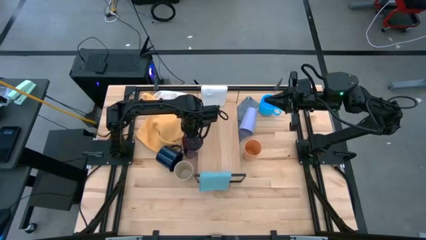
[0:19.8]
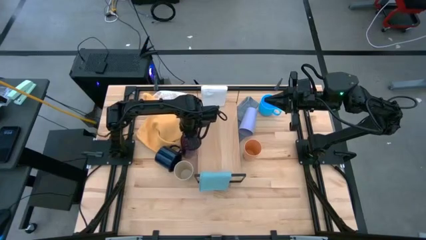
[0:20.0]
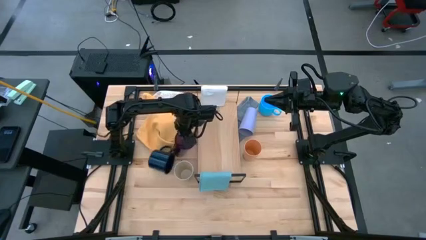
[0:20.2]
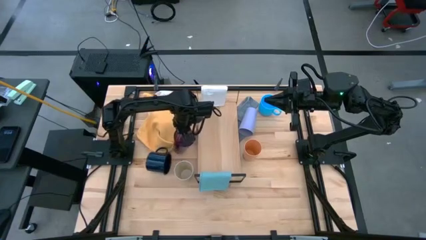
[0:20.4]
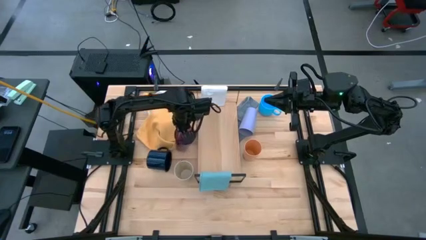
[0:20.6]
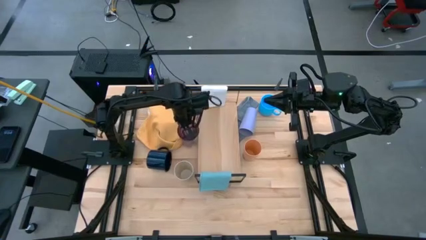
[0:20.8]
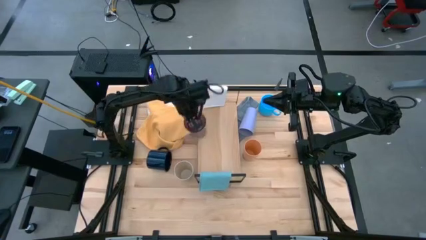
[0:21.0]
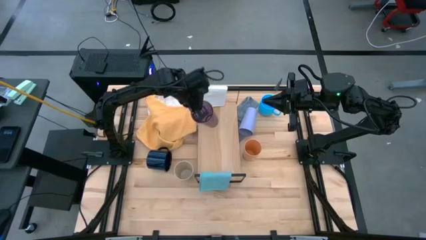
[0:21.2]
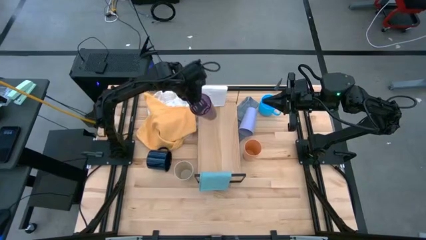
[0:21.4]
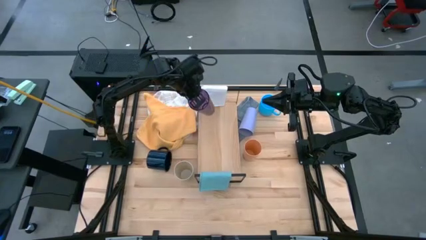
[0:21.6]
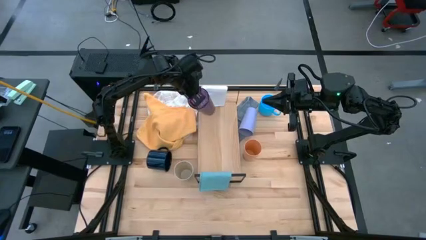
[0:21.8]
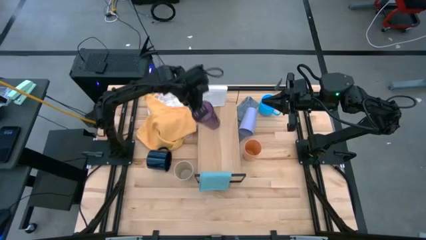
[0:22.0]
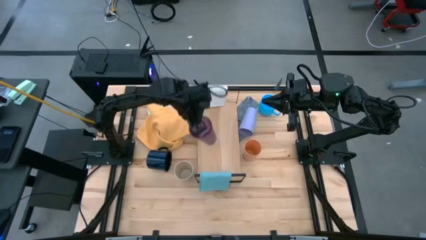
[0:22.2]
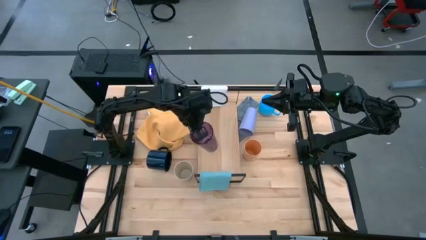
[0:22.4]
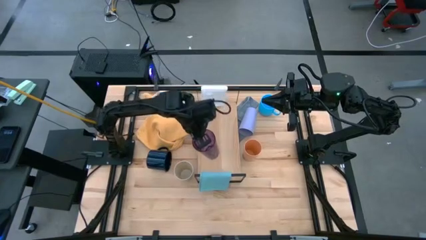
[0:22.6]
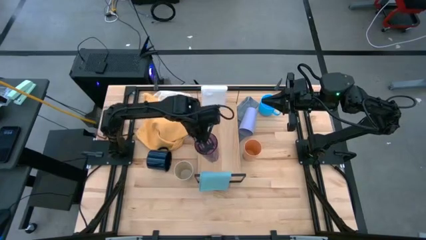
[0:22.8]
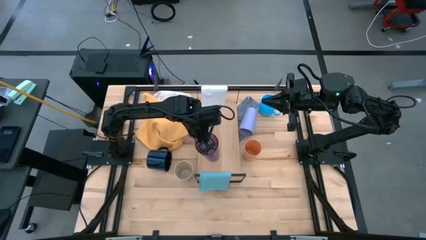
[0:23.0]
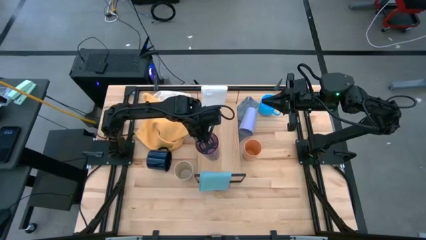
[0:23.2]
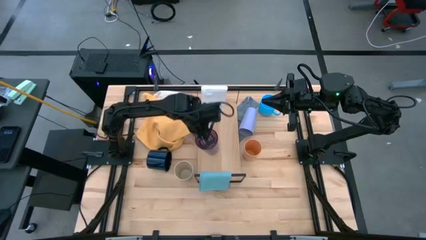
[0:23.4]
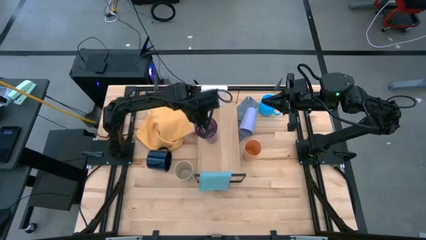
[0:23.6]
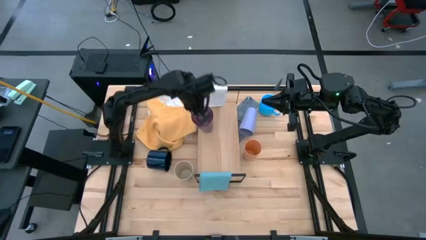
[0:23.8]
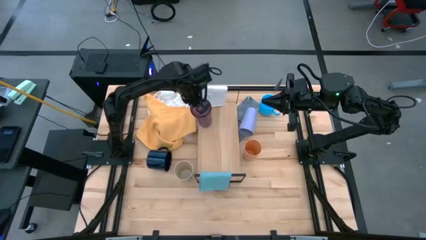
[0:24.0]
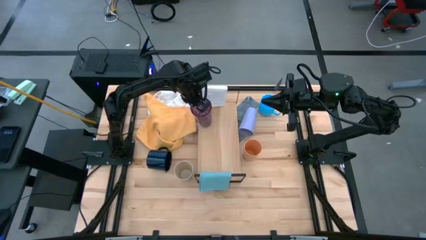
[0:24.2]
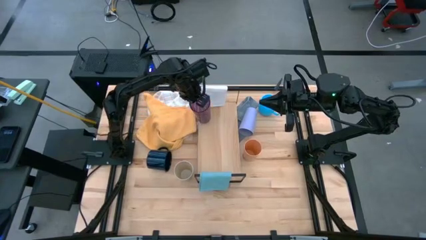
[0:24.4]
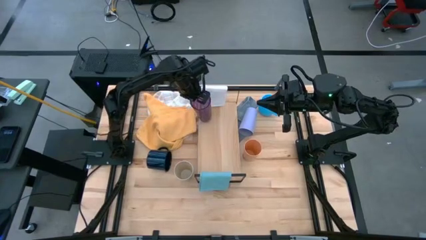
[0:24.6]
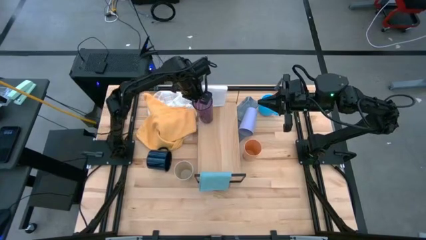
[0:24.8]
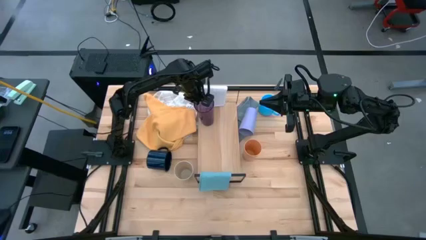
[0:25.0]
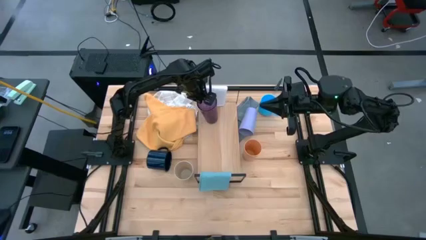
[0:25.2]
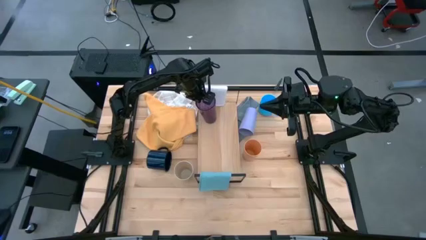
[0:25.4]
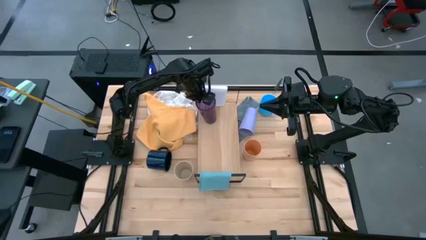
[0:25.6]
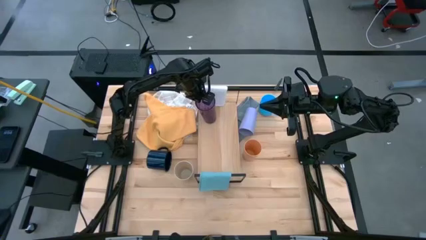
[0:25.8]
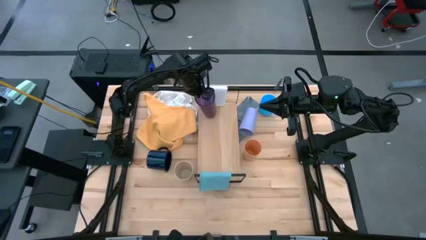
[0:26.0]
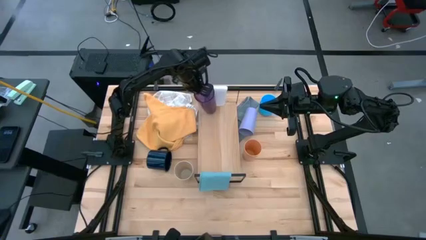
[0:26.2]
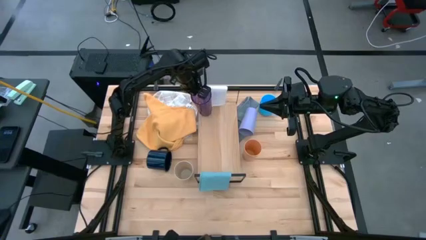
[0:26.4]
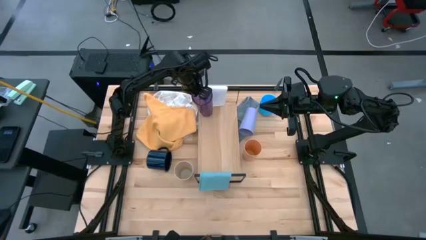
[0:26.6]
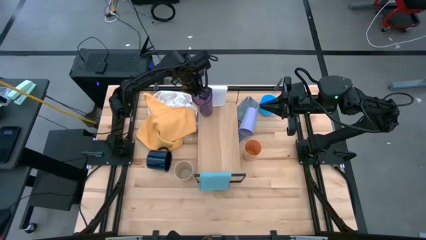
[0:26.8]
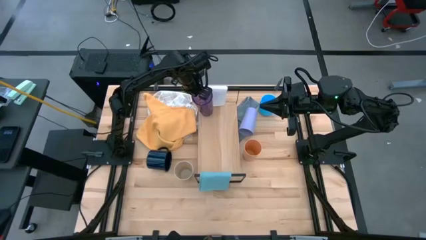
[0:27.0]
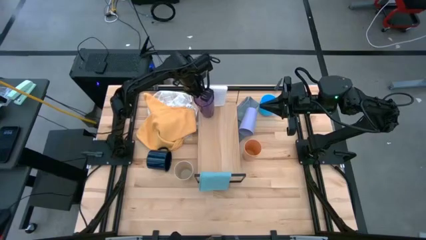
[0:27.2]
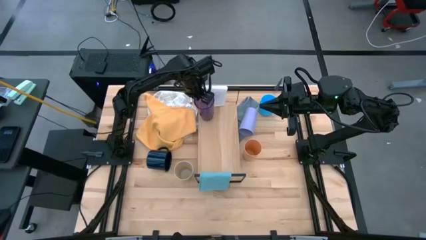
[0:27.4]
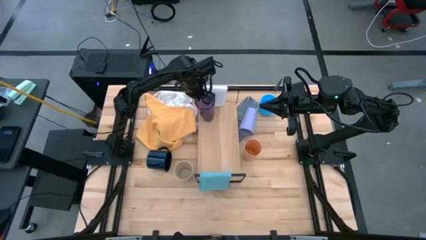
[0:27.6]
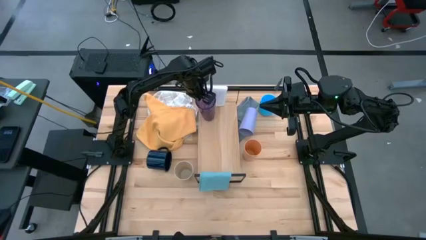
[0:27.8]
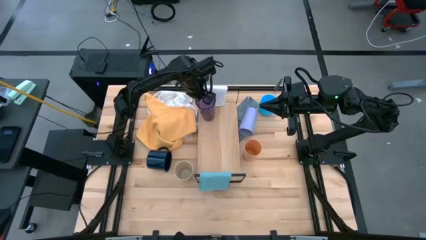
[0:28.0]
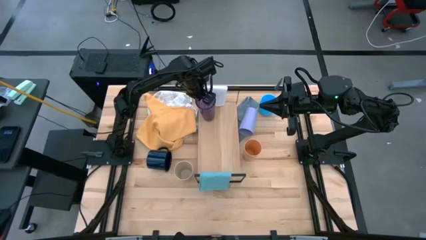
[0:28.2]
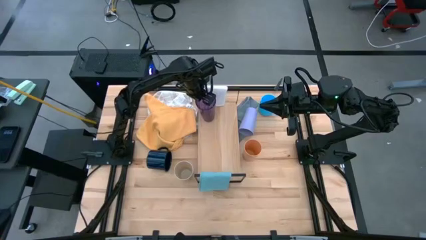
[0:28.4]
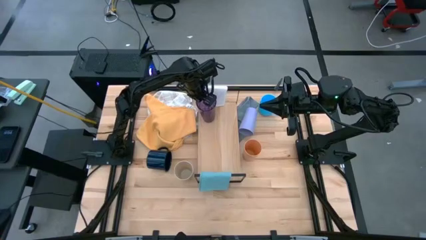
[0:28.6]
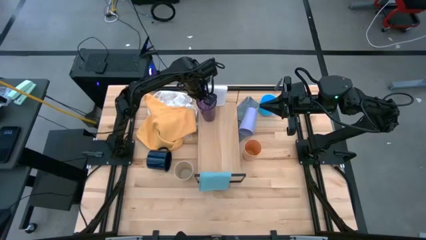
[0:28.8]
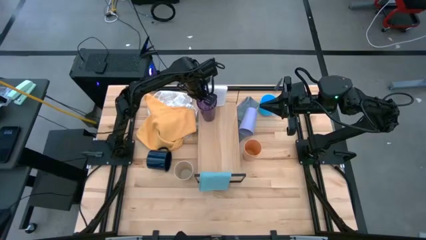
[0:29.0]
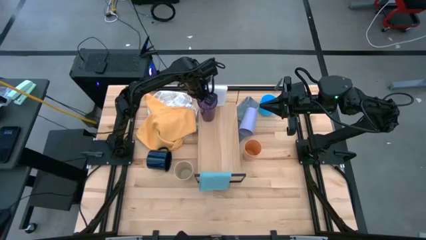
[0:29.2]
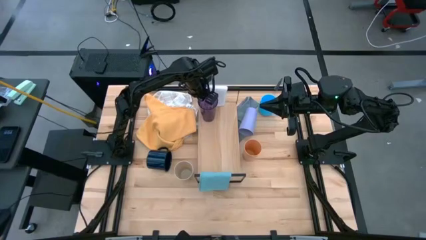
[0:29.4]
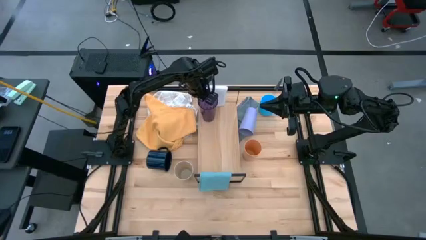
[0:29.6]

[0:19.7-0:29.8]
Task: Stack small to large cups/mugs on shelf
Put the violet cup on the shelf
